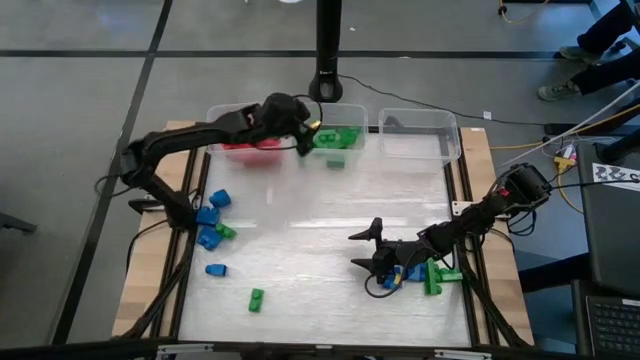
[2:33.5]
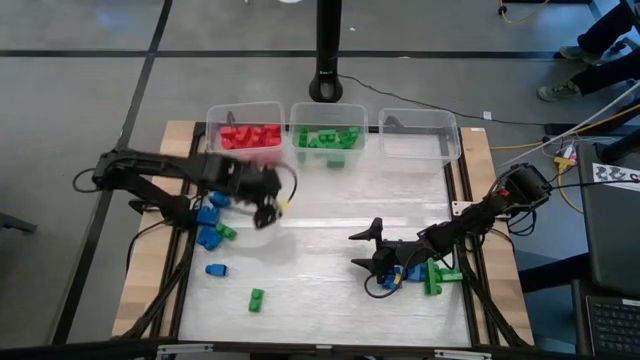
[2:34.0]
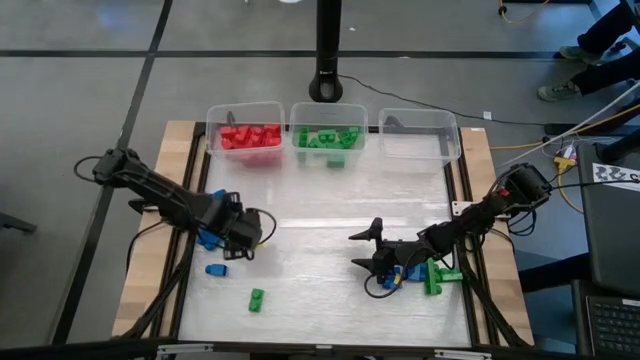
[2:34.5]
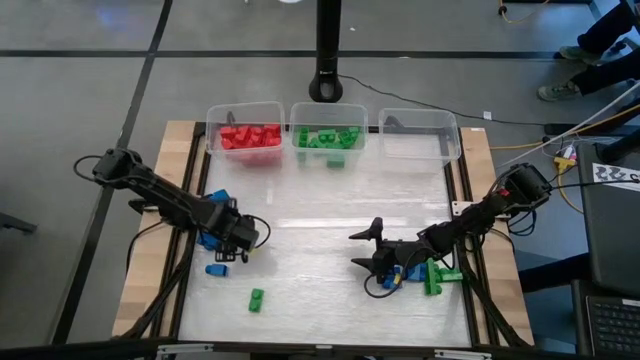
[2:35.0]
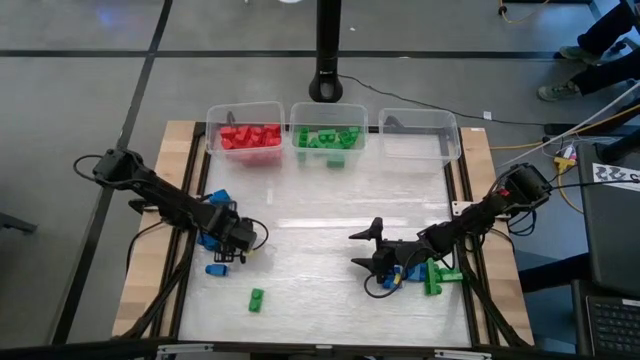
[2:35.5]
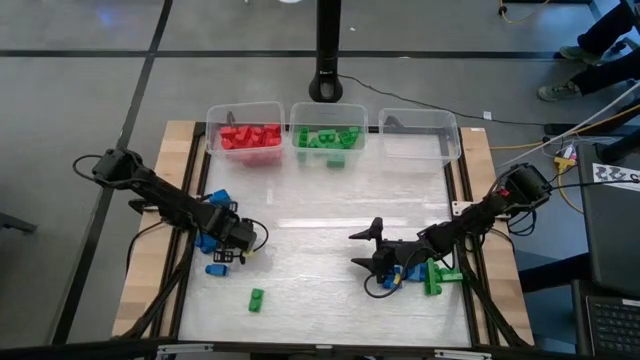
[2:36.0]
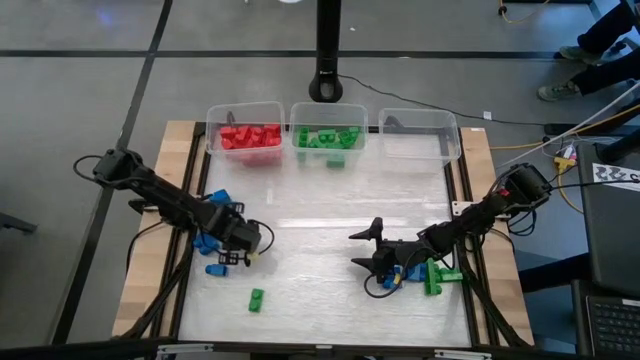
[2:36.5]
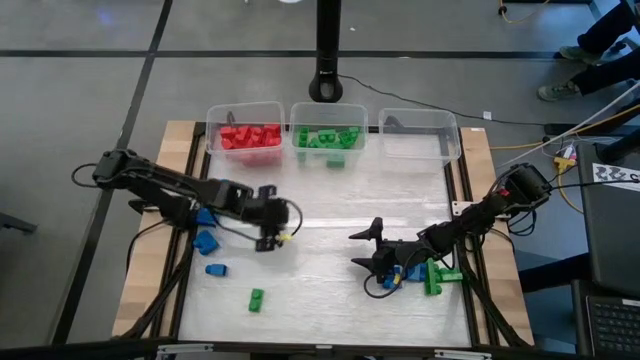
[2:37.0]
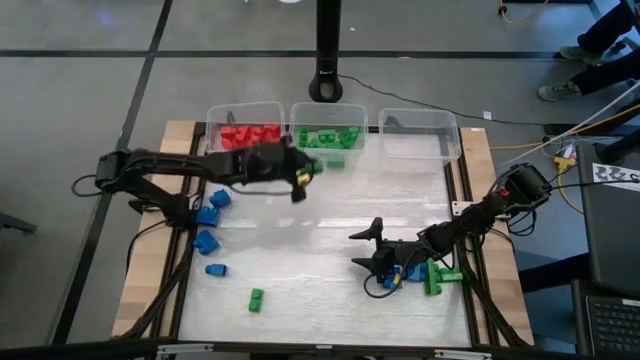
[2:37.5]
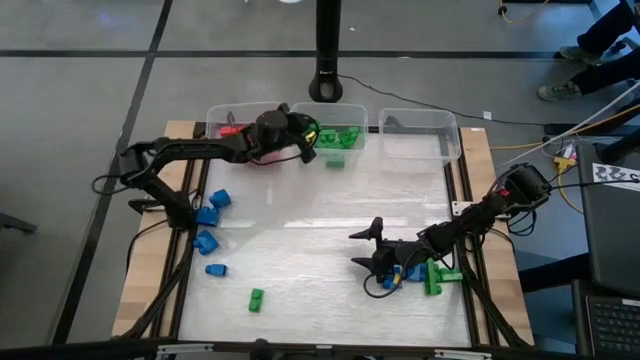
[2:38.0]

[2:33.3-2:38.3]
Task: Sort blocks
Put the green game piece into the middle transparent bin

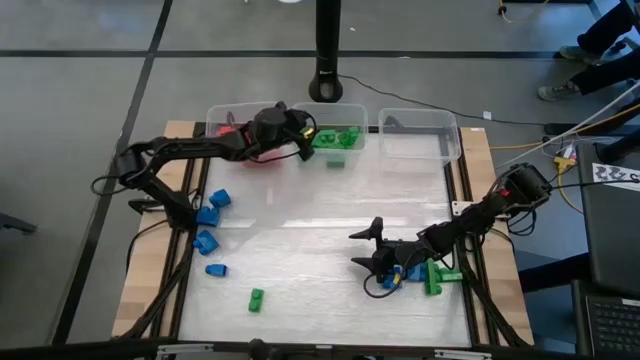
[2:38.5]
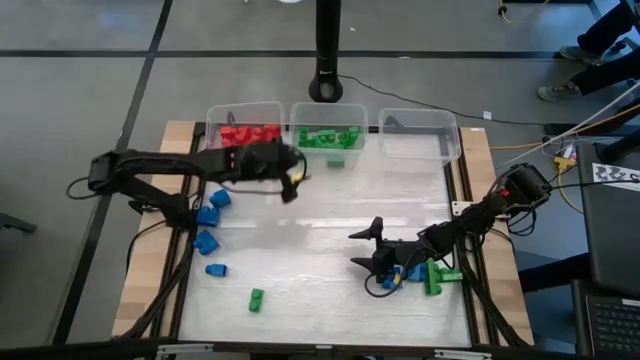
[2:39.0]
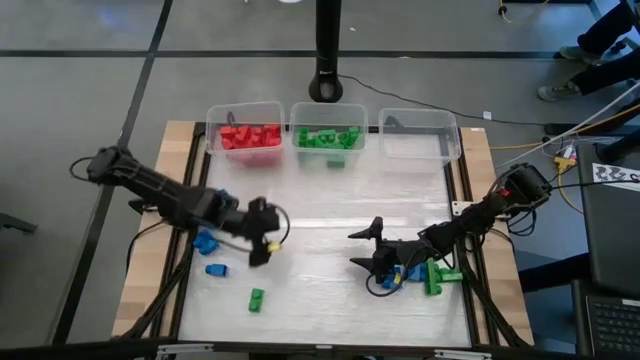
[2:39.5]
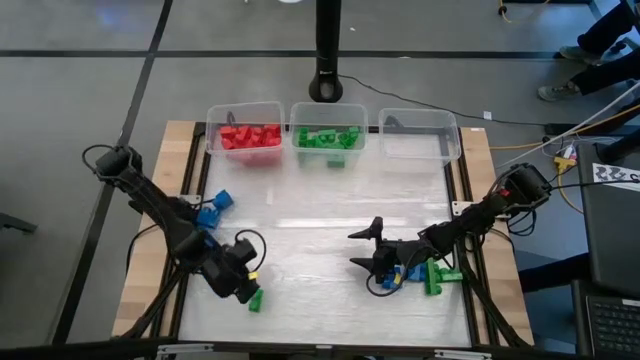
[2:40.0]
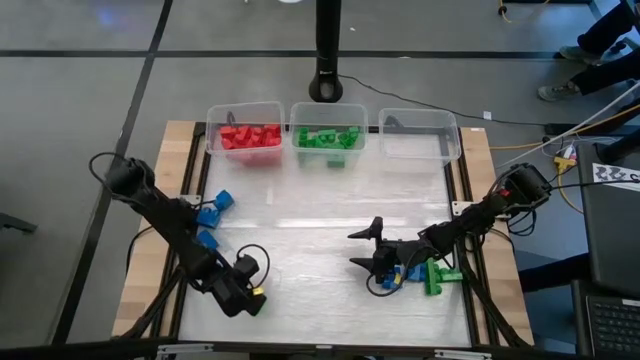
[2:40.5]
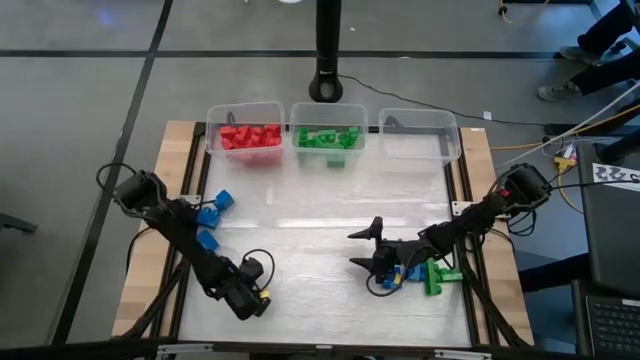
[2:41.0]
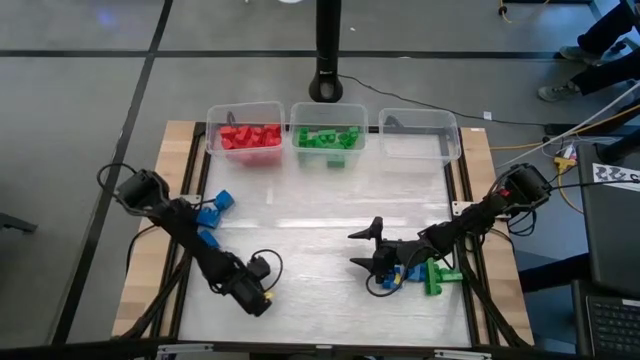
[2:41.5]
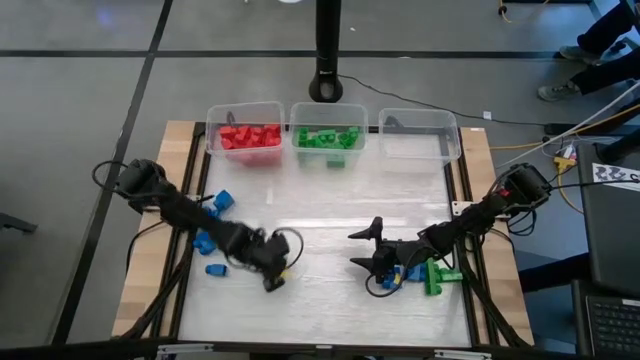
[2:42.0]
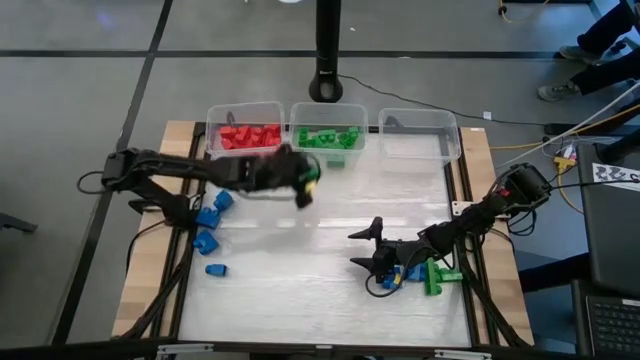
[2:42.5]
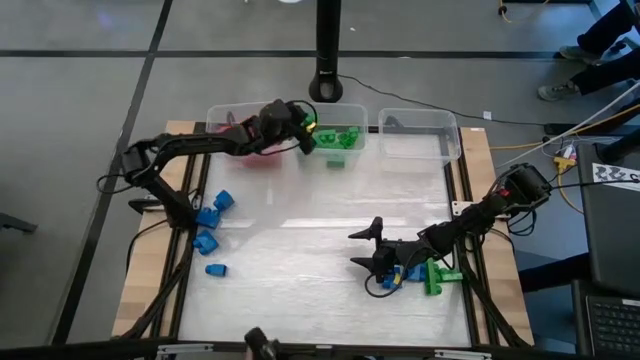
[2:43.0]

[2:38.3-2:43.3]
Put the green game piece into the middle transparent bin

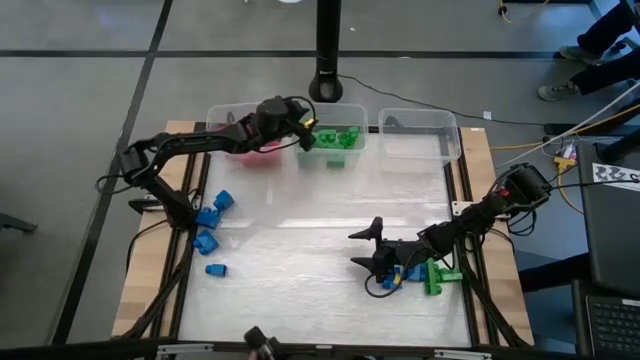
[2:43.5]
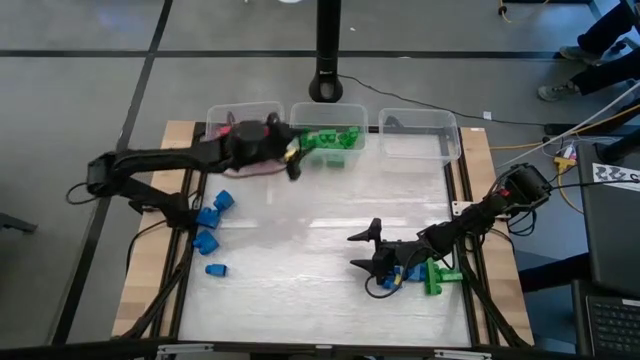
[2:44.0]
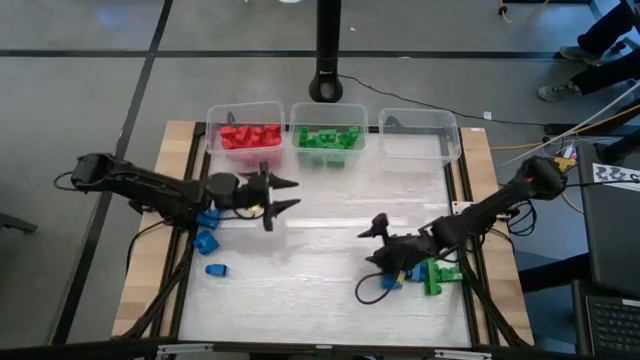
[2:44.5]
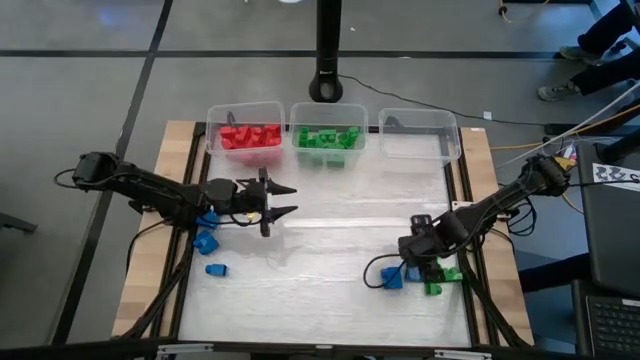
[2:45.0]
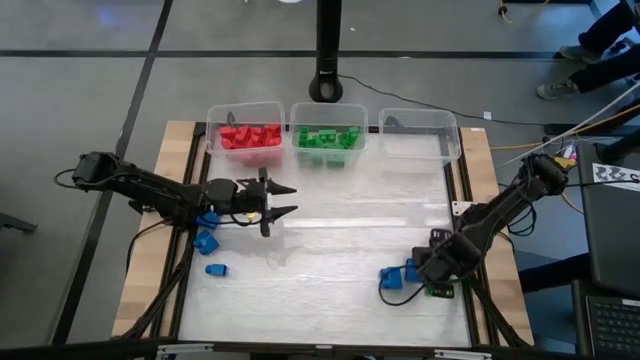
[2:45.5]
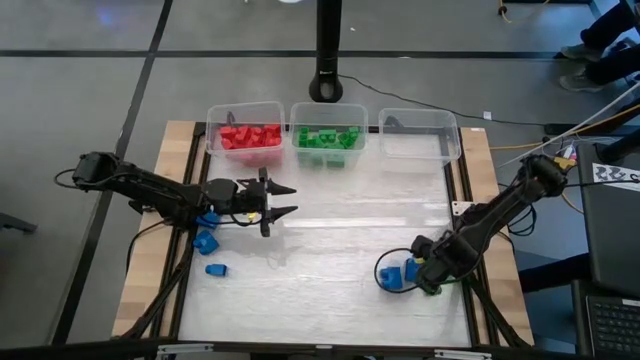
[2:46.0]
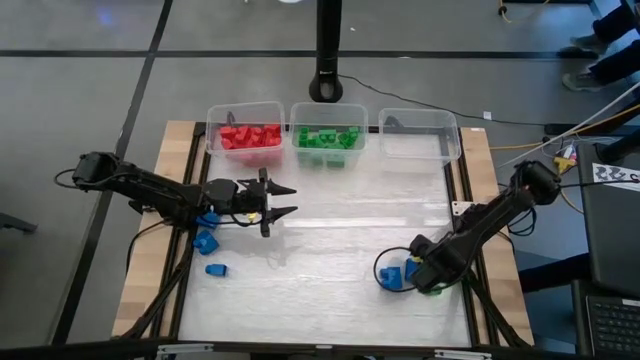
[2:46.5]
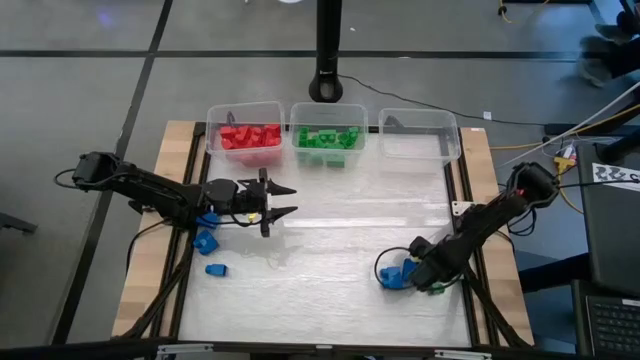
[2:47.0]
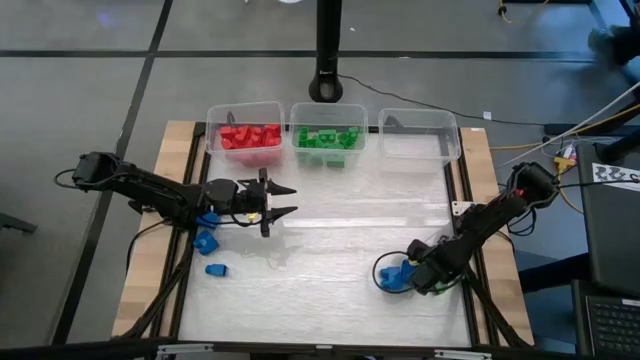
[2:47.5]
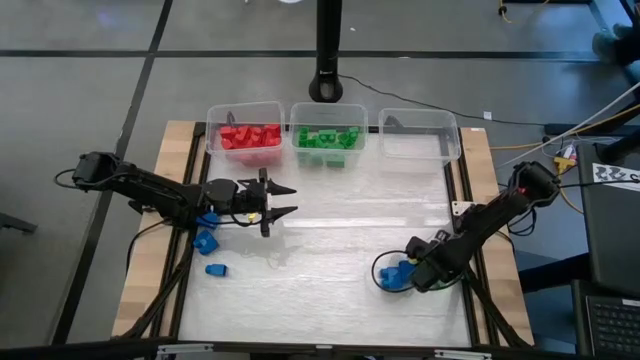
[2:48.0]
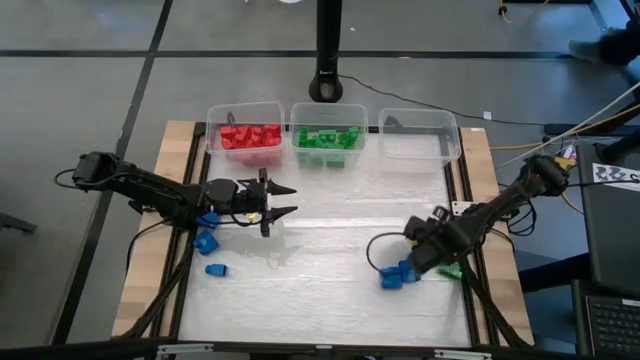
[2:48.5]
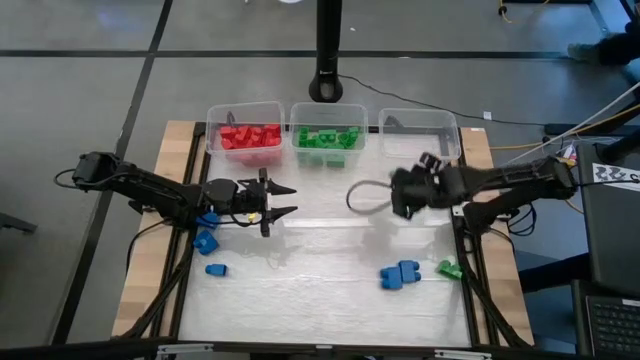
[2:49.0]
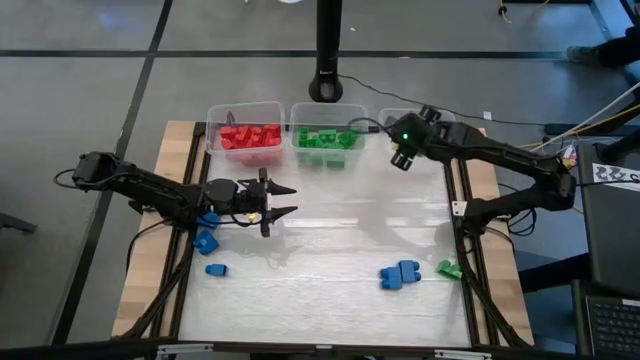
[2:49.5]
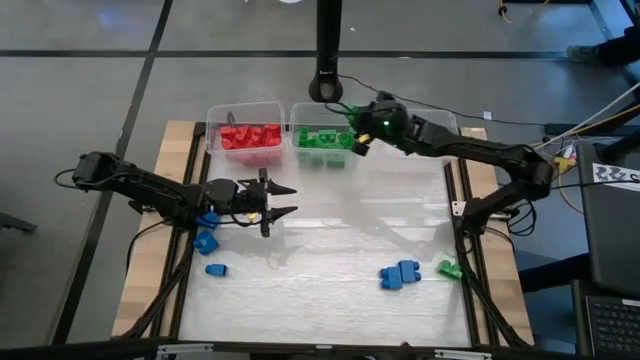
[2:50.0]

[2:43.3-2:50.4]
Put the green game piece into the middle transparent bin

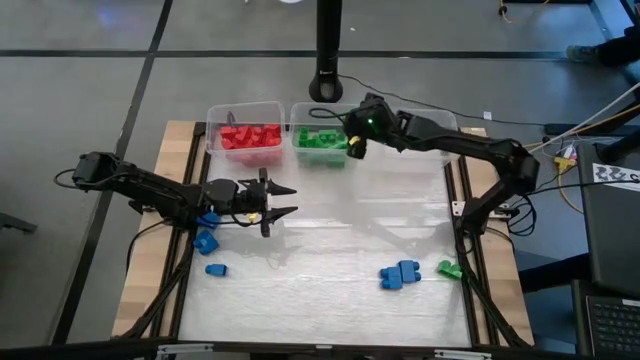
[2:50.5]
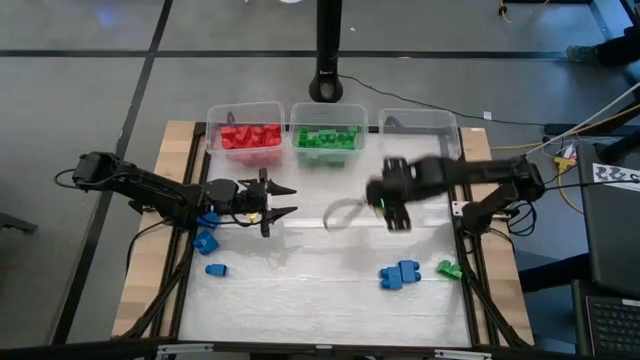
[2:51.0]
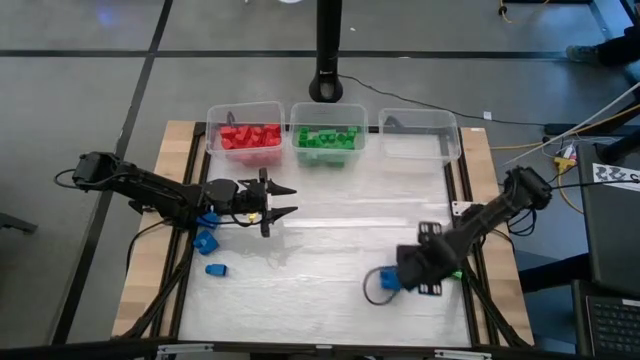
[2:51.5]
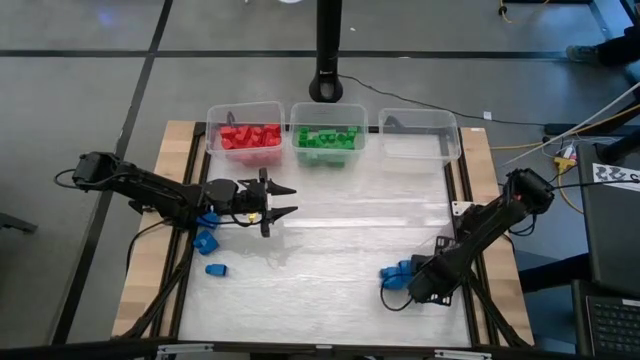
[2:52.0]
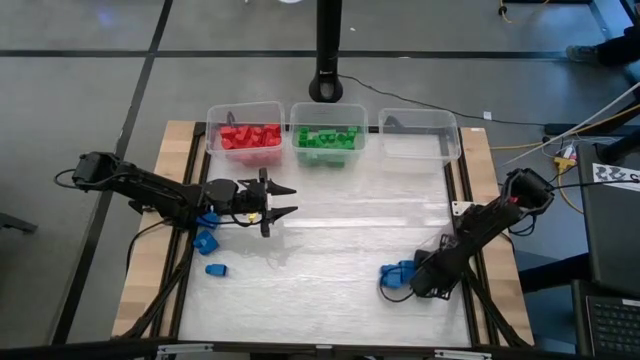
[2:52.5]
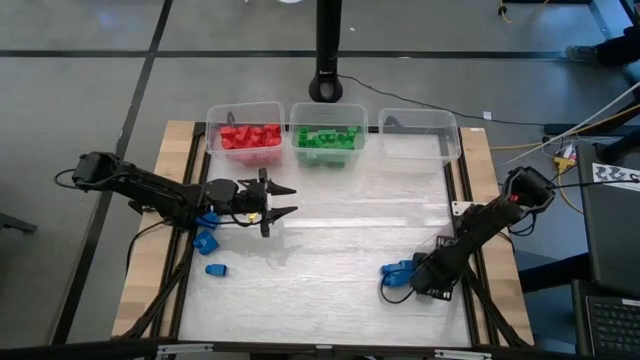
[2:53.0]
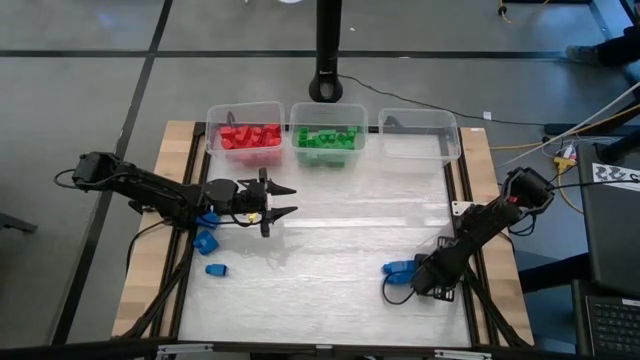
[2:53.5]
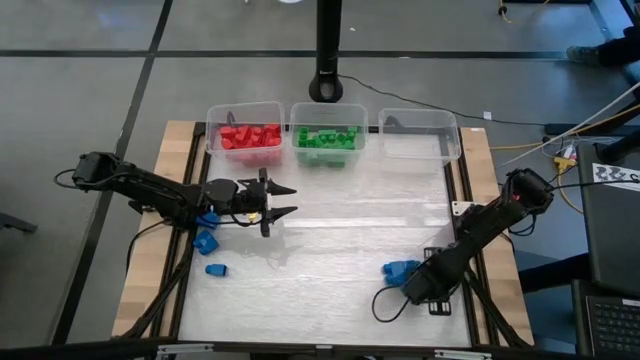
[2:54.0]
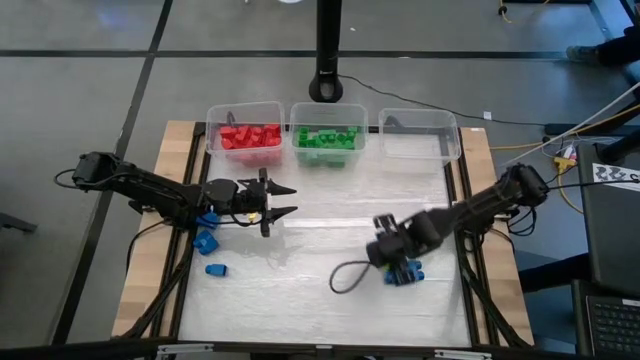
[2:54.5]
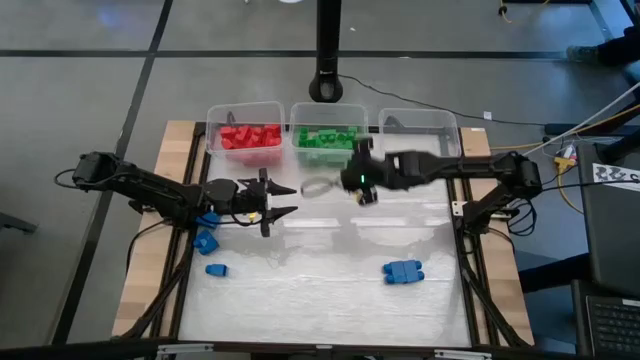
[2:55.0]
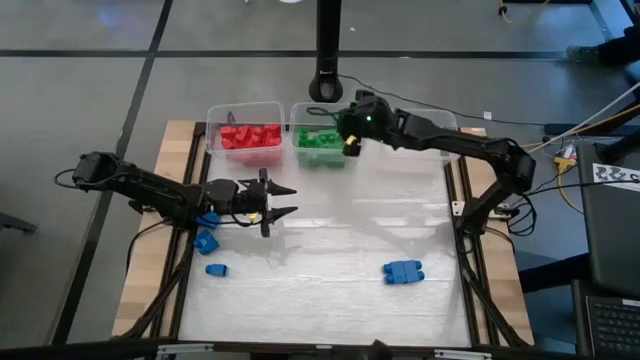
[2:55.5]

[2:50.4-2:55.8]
Put the green game piece into the middle transparent bin
